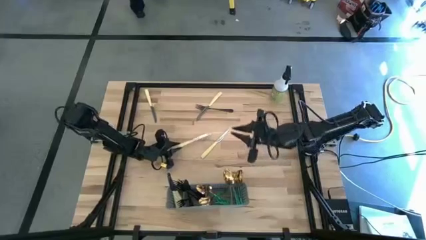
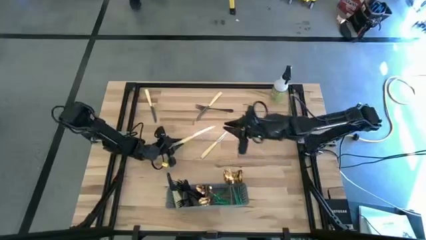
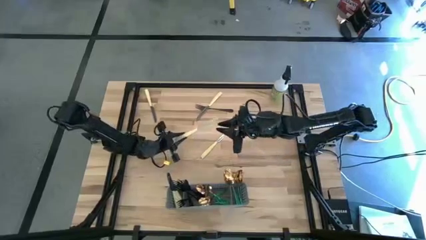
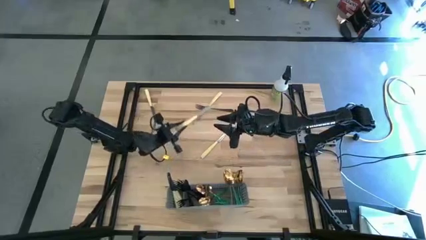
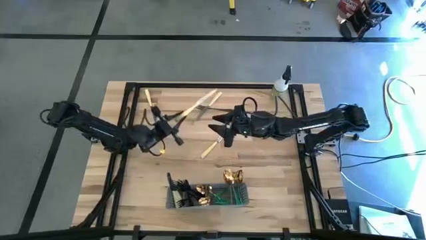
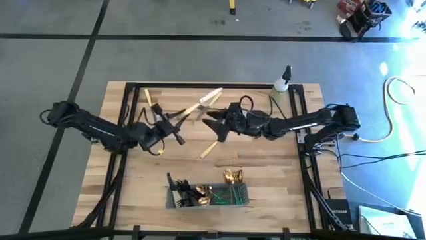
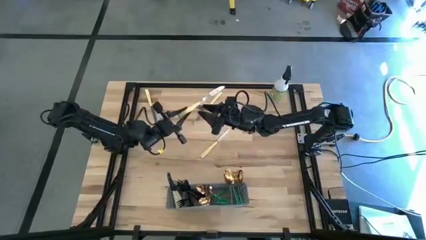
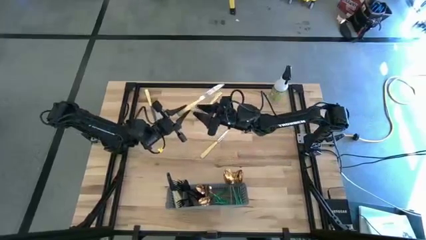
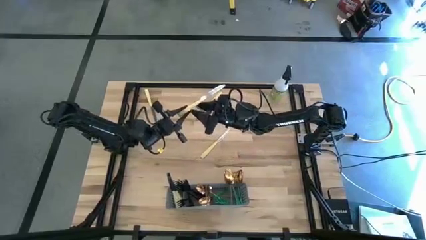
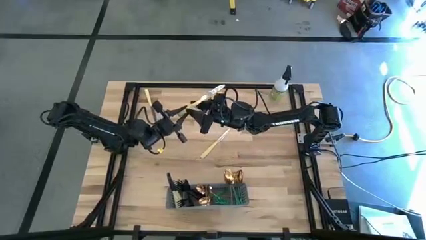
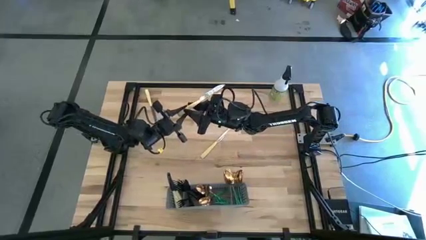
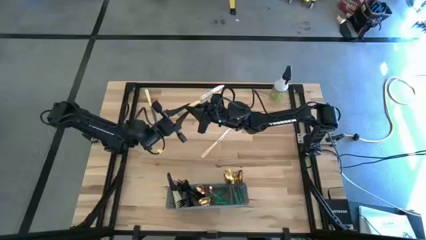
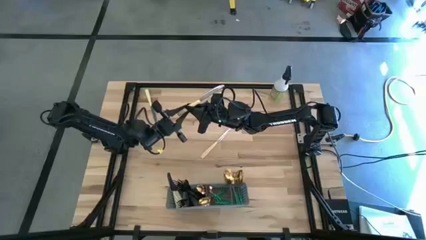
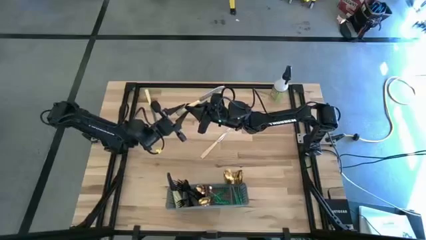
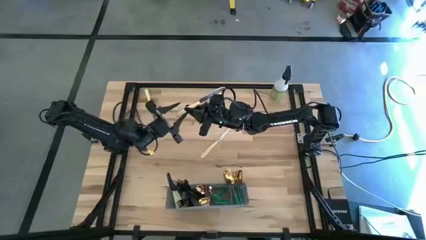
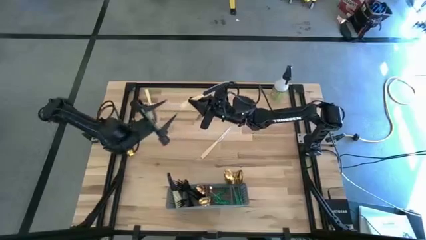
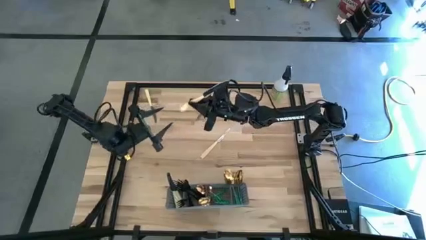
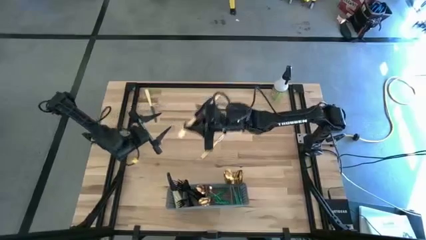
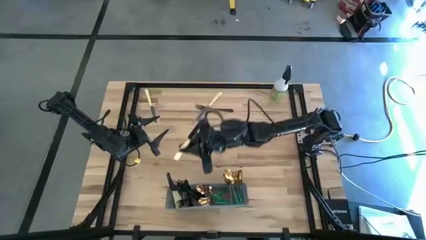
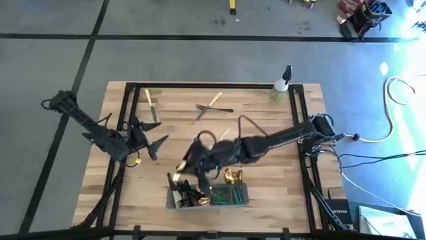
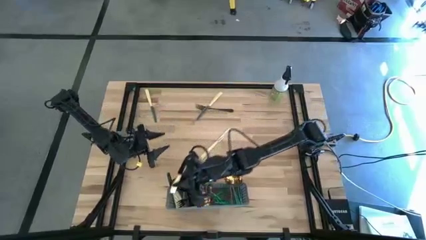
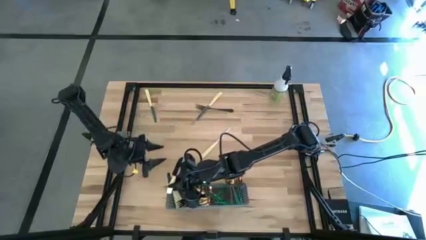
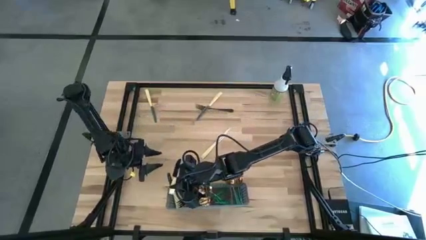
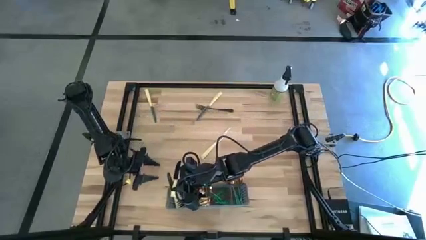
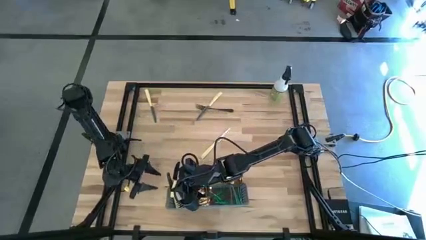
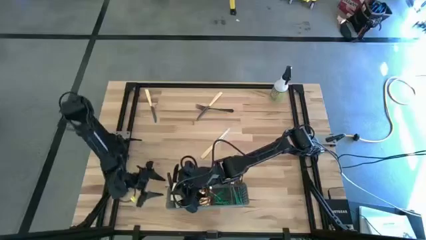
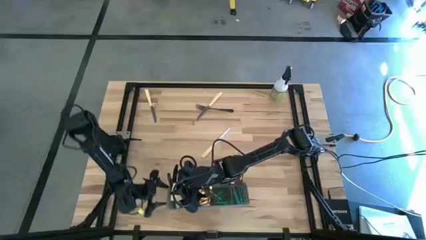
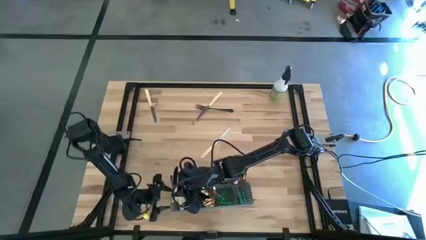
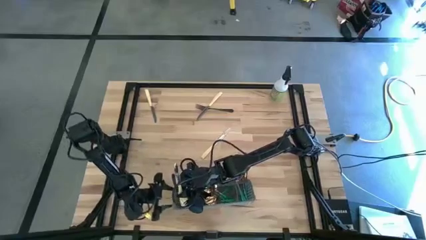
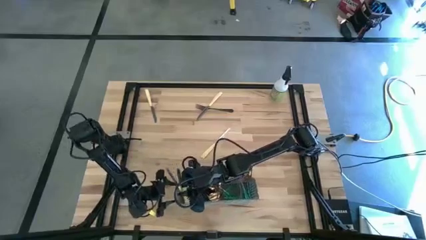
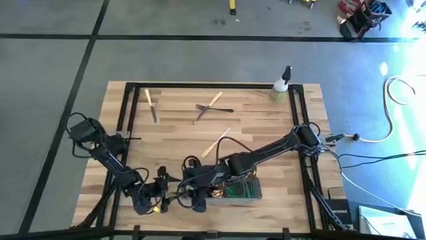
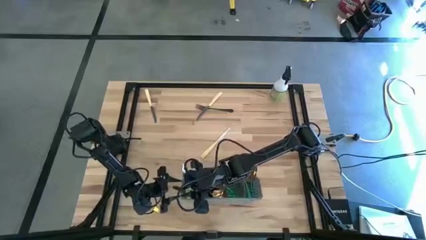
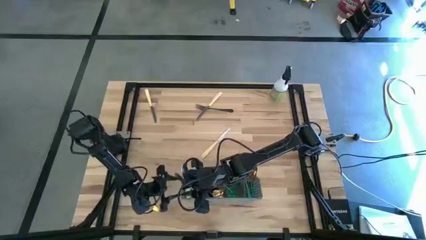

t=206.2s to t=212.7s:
Task: Sort silverware
Put the left bottom yellow knife into the gray cutlery rack

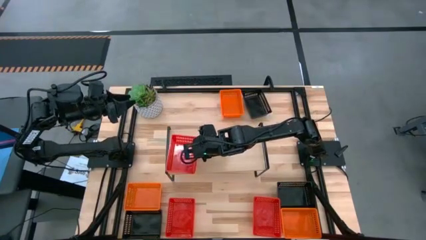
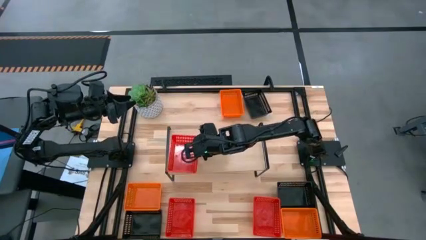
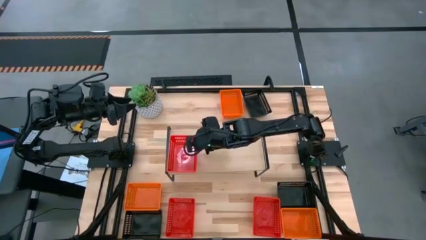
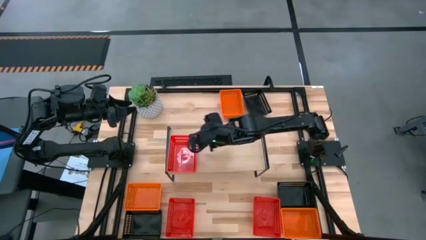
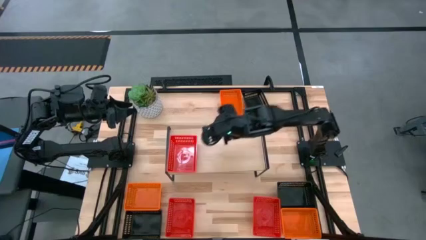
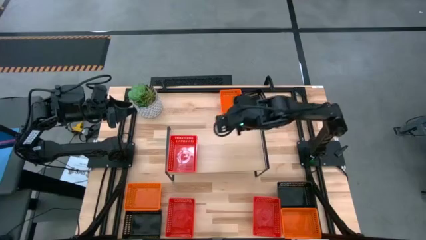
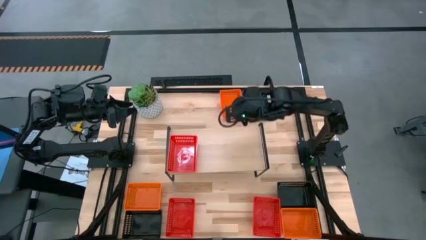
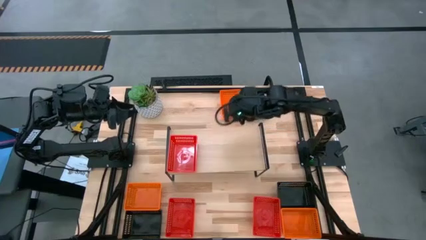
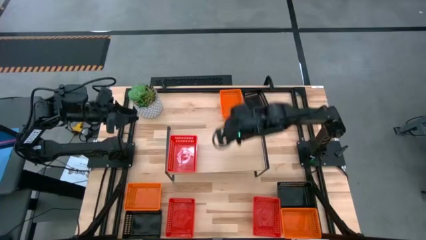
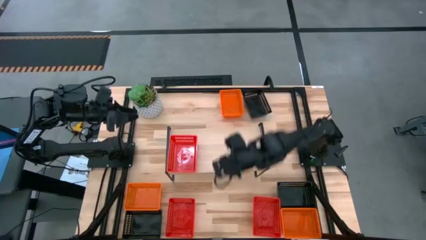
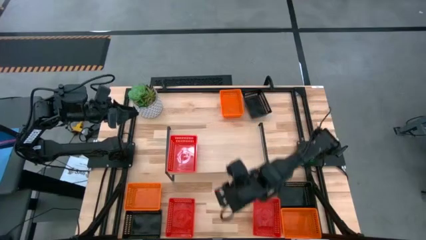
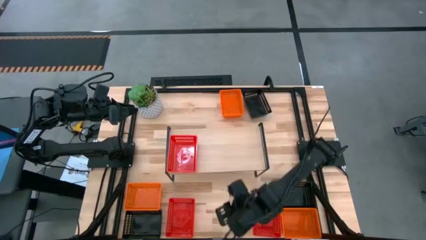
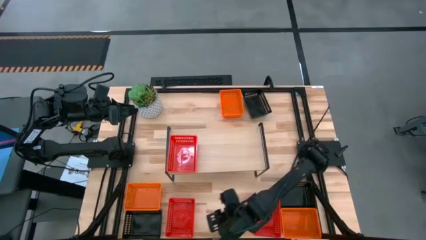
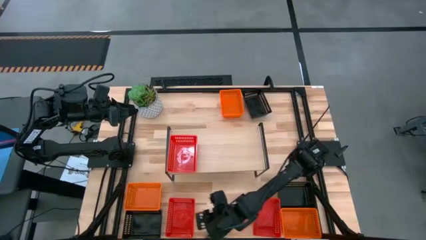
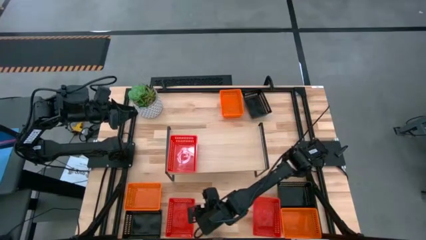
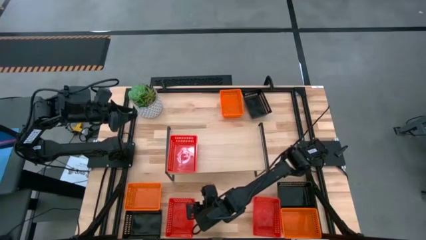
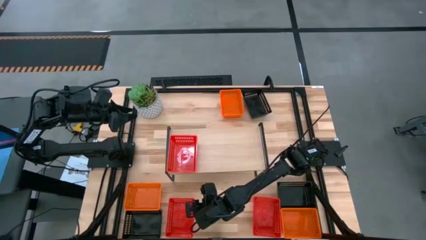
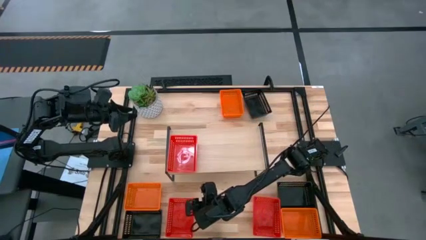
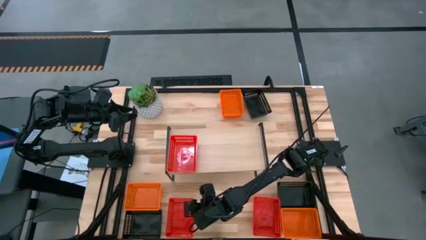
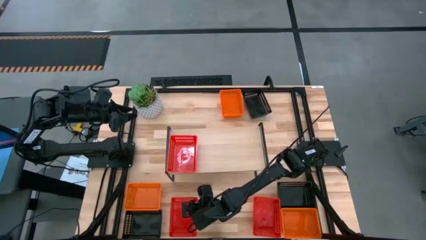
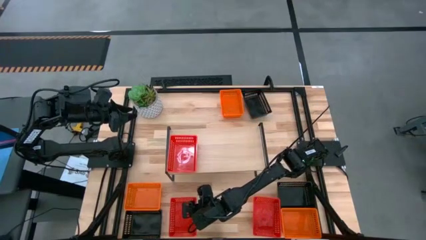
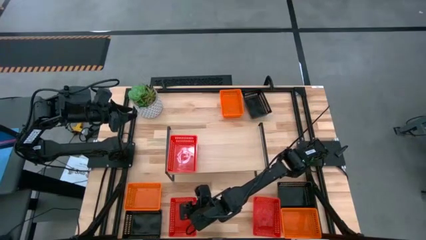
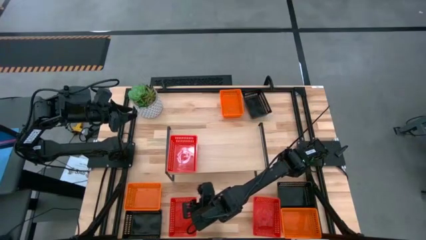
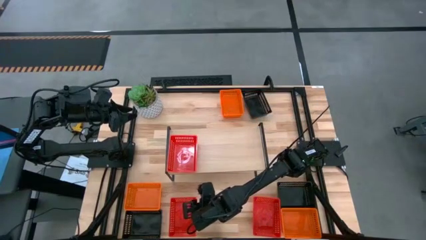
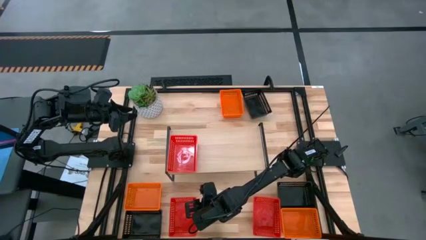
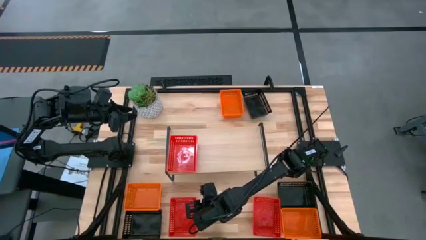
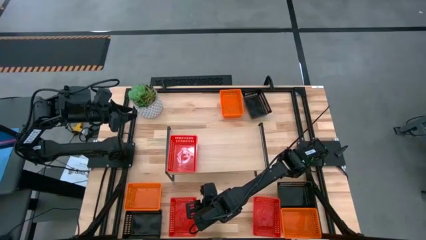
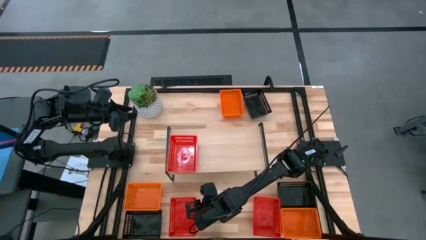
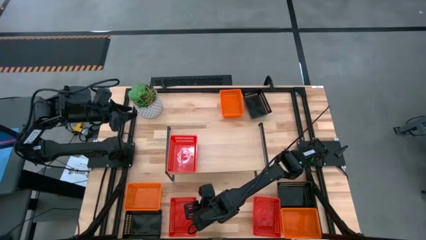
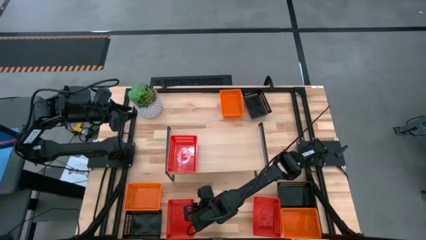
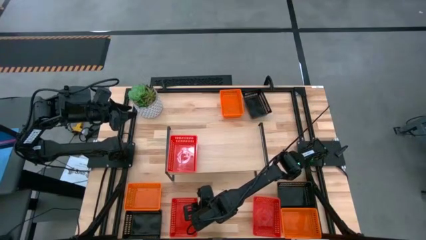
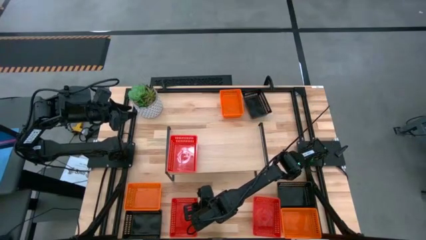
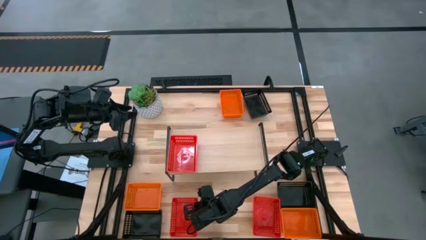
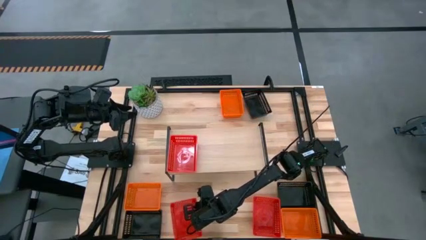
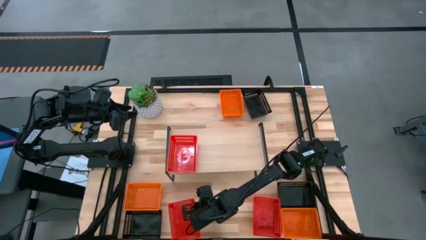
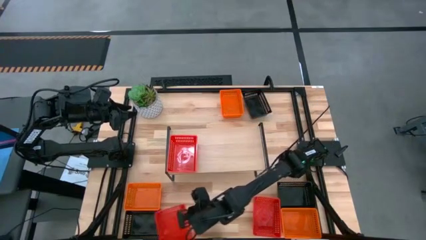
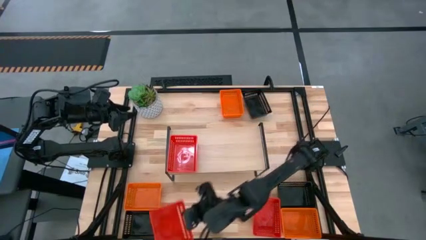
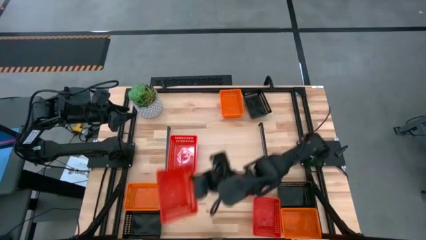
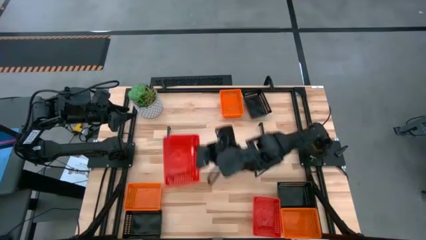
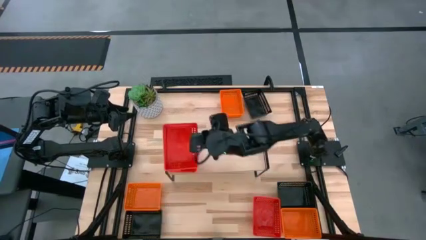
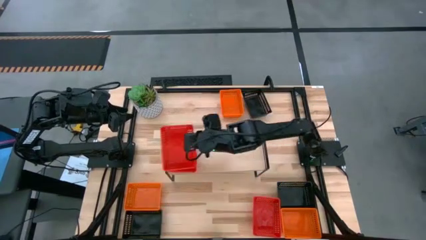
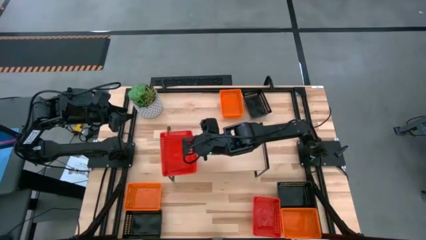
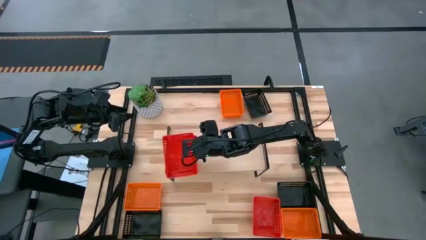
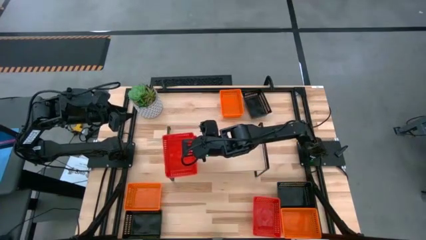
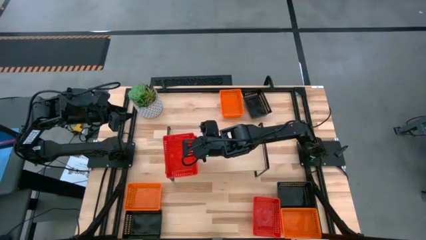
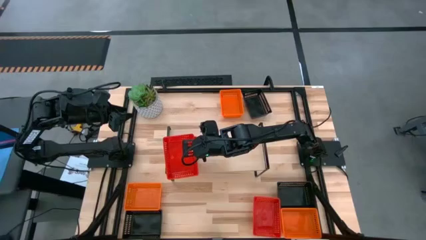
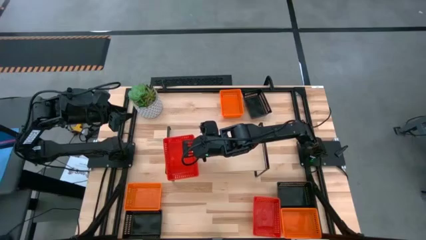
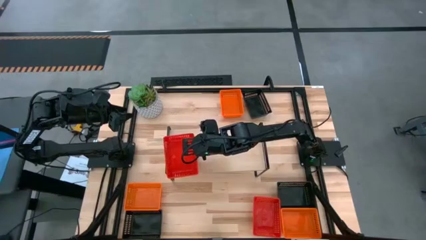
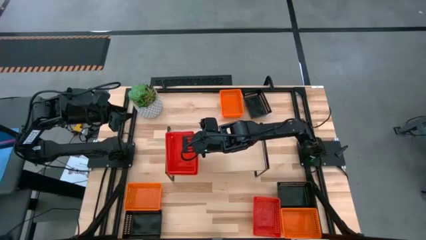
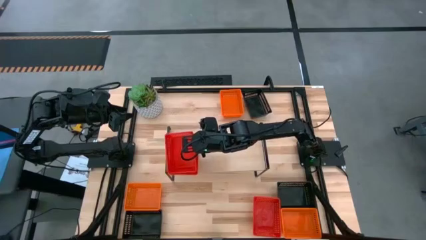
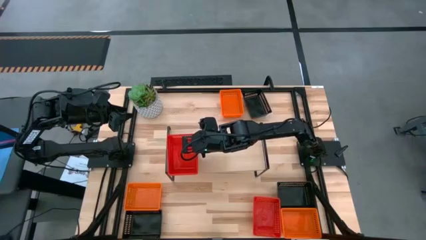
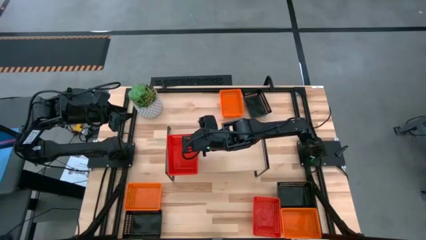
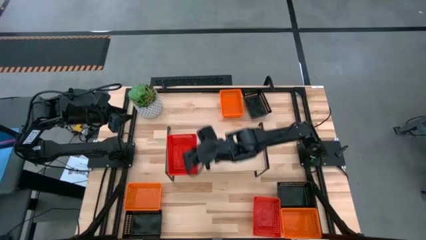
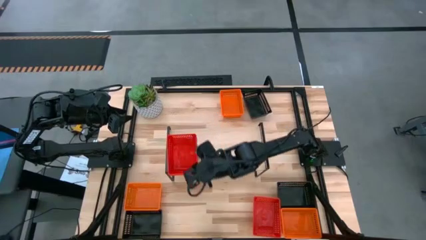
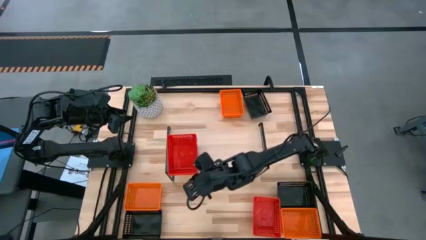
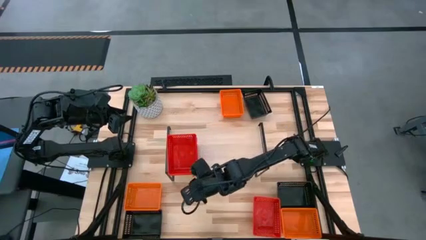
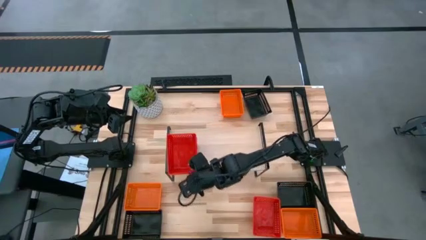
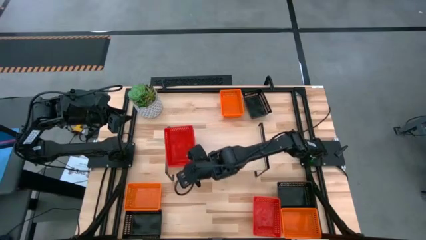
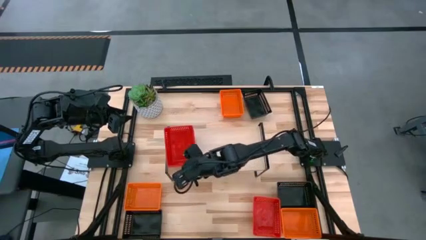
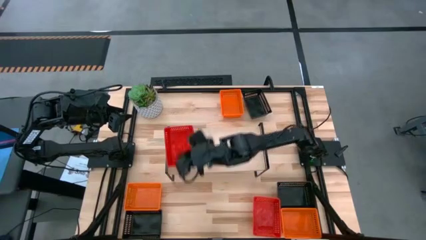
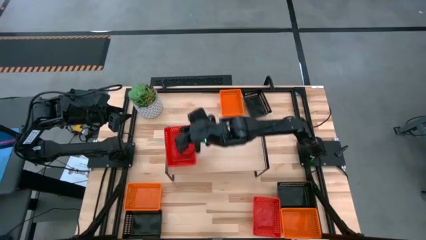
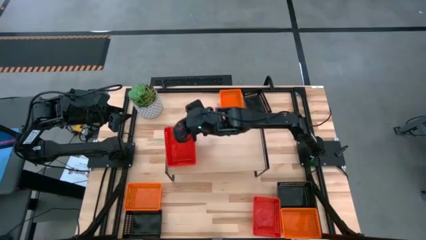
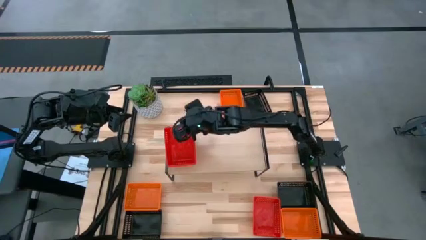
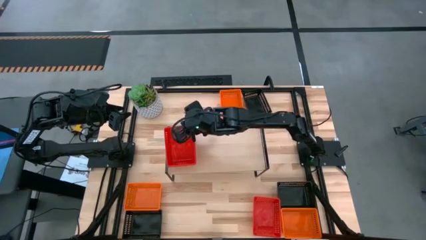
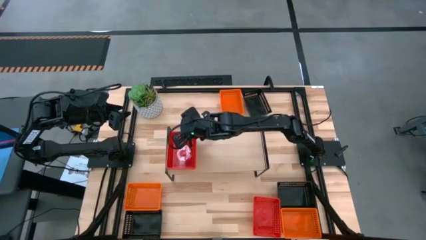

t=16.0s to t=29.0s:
Task: Stack baskets on shelf by color
Stack the left red bin on top of the other red bin on the shelf
